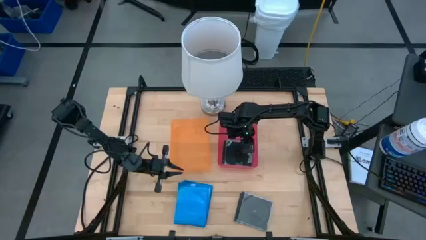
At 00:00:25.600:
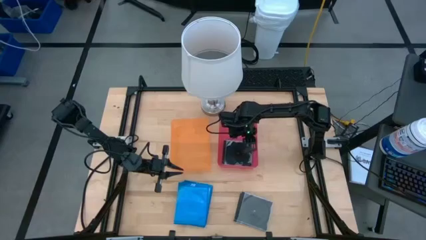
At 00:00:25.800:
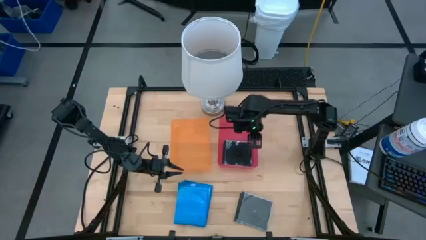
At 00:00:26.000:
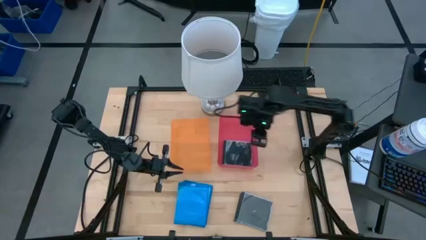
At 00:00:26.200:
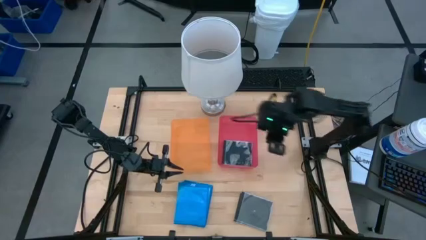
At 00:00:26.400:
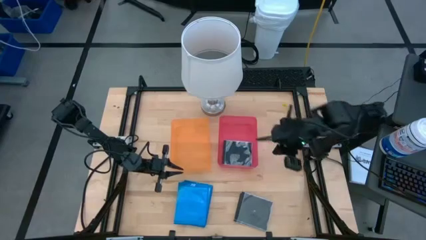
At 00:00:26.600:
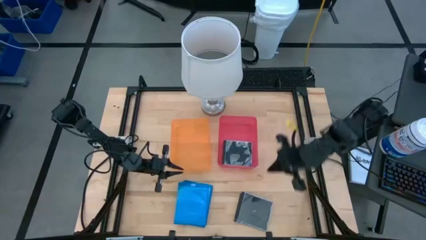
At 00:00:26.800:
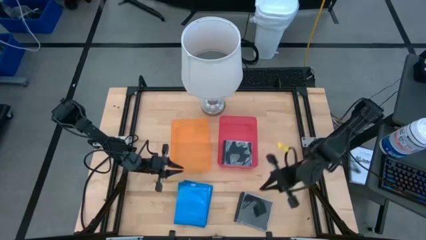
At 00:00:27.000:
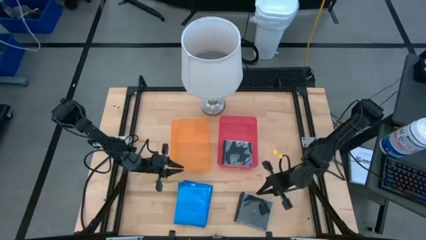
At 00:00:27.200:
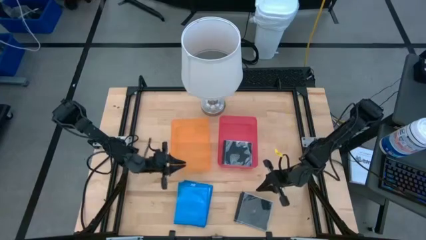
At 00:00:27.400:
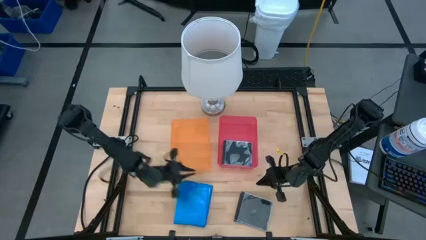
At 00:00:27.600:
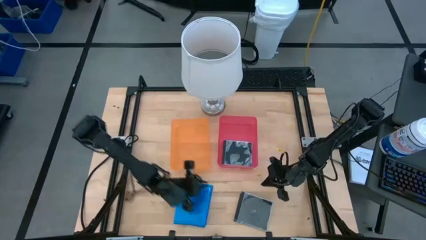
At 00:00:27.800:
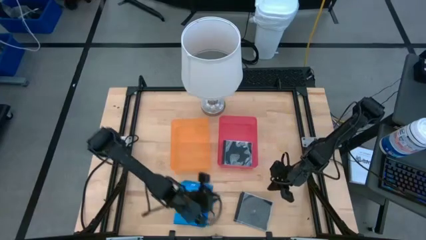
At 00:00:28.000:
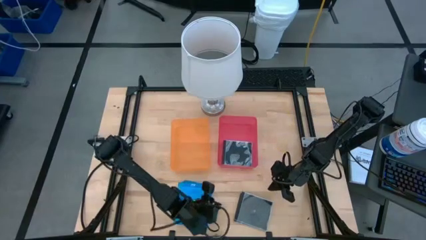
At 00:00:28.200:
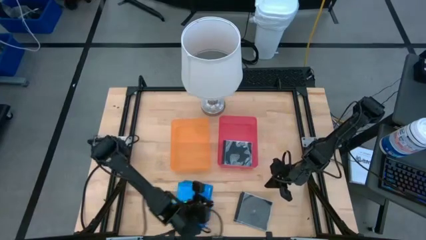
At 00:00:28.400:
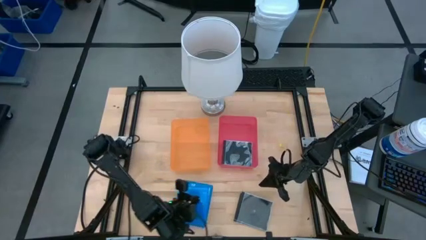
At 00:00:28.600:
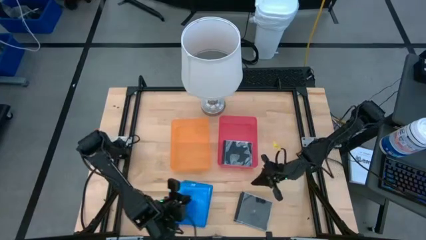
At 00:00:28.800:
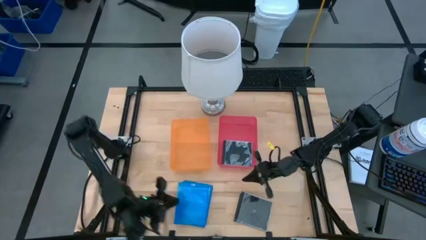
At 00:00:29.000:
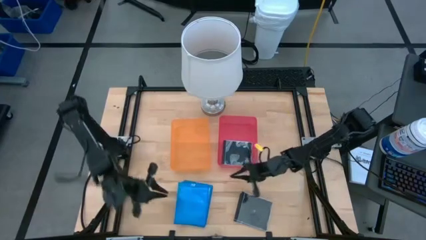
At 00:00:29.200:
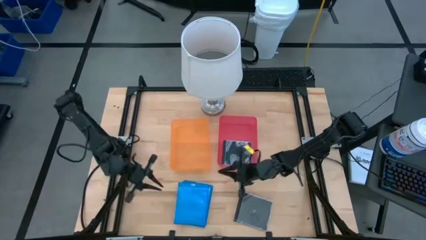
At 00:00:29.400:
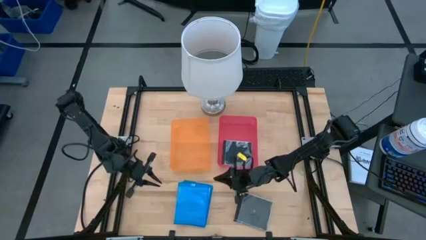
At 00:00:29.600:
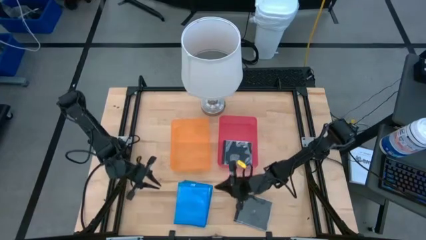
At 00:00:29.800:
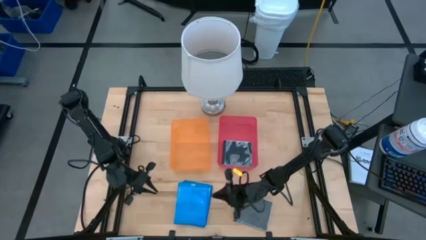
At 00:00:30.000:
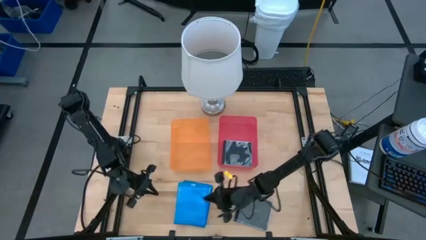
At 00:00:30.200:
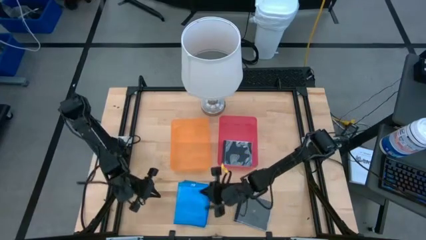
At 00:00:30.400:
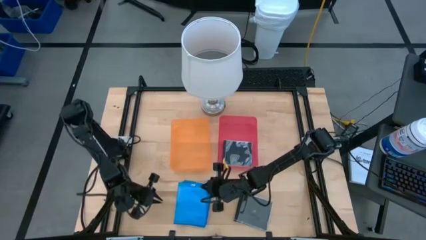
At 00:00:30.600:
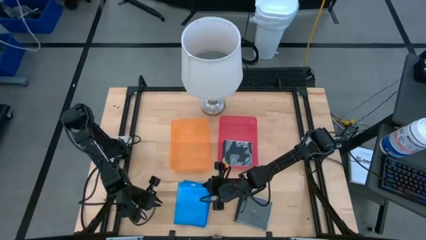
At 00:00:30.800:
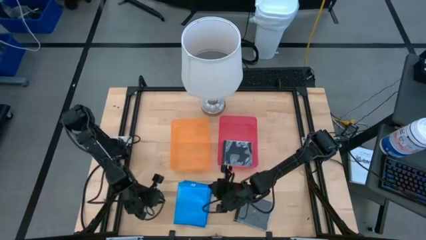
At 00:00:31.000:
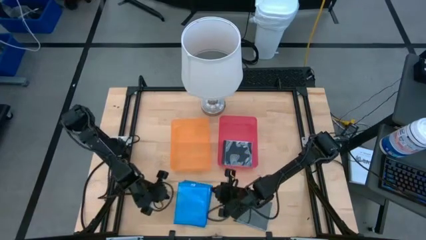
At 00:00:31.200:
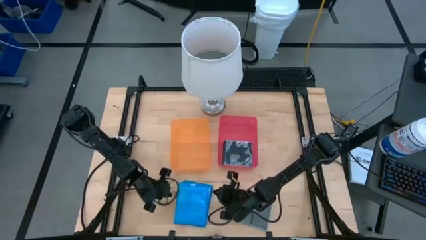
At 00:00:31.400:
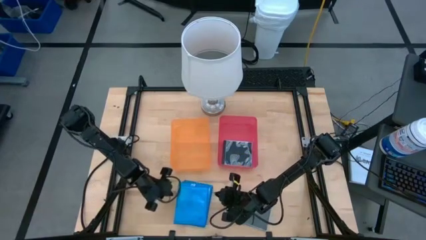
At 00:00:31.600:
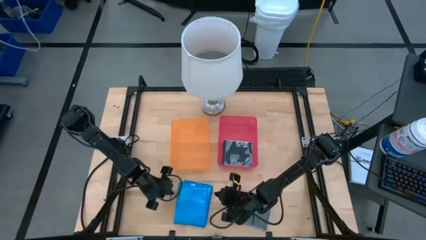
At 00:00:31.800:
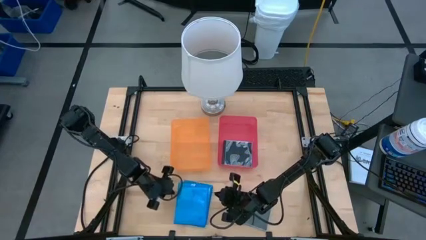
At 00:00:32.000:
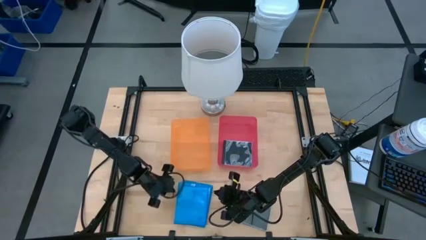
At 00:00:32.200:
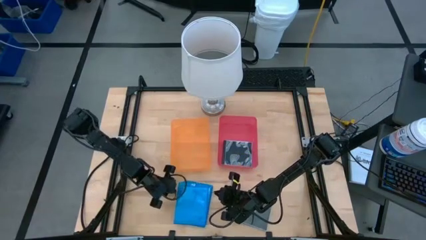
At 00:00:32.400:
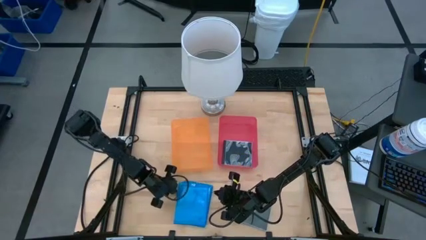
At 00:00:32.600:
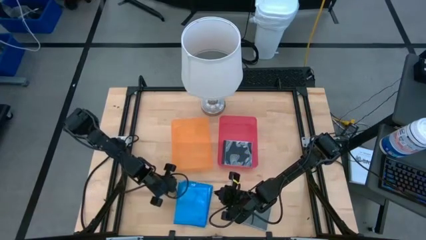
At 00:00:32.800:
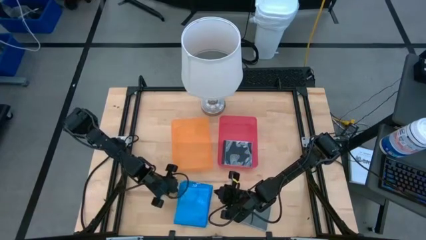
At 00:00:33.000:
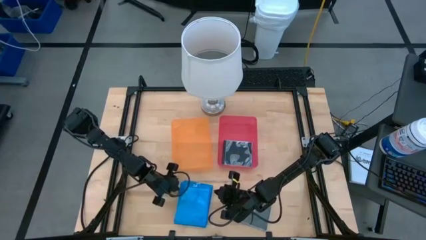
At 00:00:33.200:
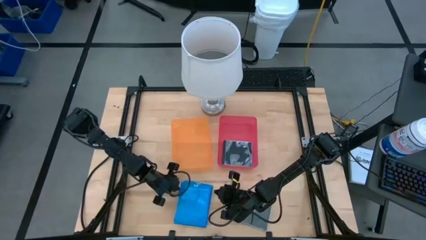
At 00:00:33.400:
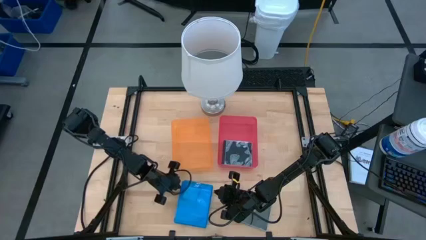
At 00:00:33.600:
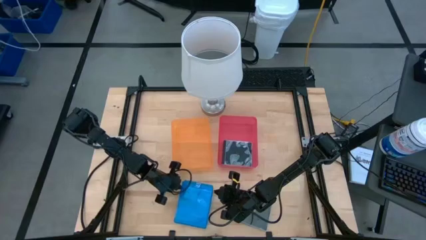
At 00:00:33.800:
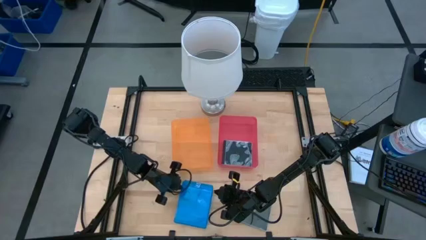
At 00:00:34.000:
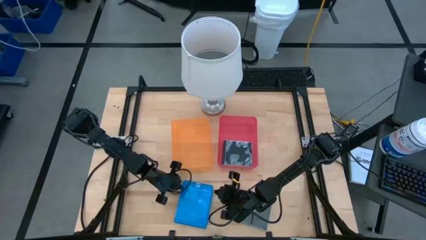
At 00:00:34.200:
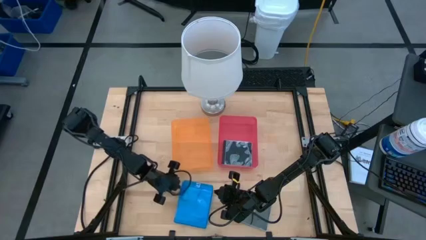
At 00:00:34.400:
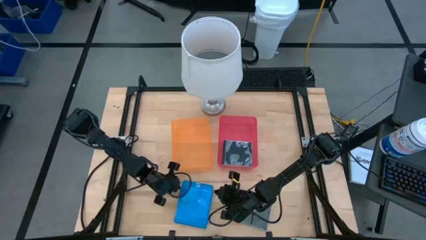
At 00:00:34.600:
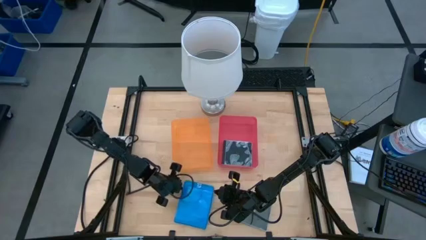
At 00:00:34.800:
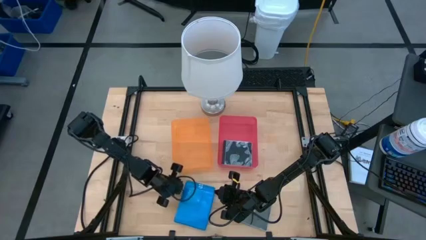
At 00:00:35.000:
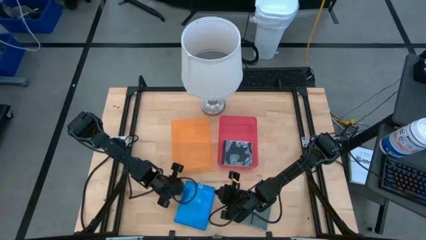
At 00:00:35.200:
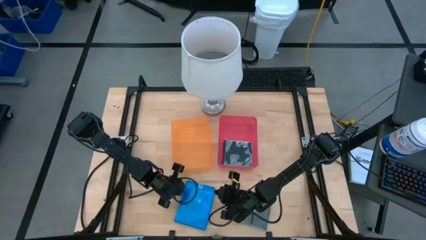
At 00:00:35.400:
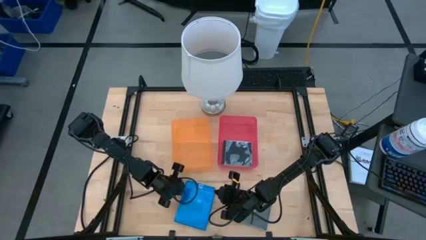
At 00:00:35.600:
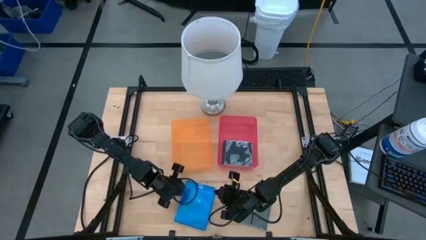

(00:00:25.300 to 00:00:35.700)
Task: Pick & place jewel cases by type
Put the blue CD case into the orange bin
